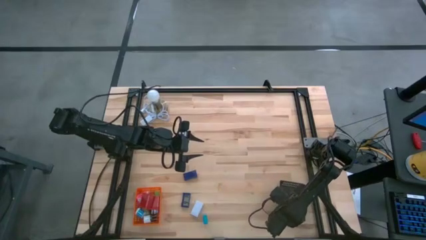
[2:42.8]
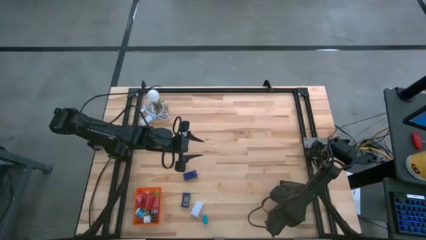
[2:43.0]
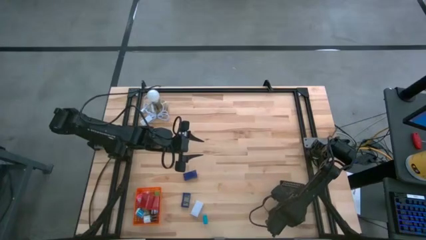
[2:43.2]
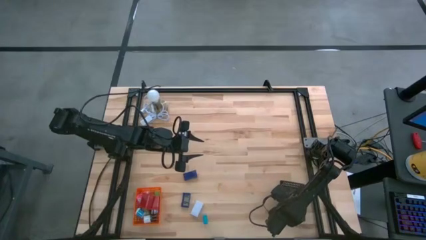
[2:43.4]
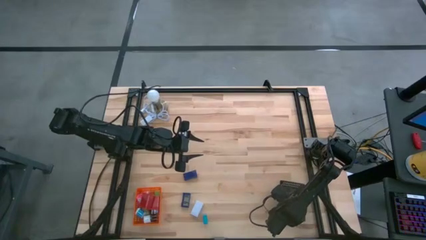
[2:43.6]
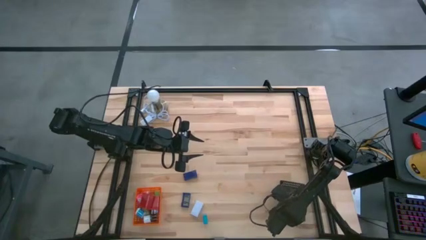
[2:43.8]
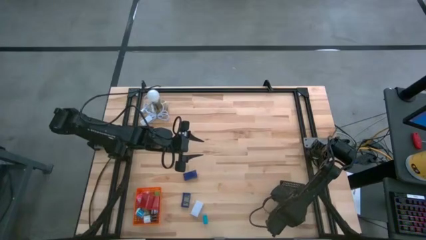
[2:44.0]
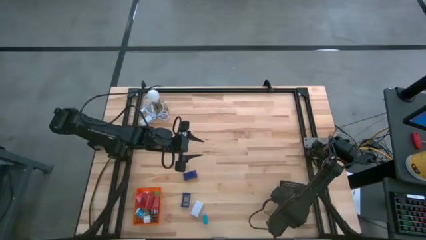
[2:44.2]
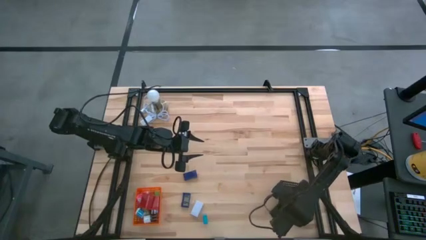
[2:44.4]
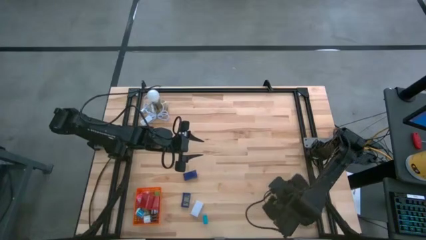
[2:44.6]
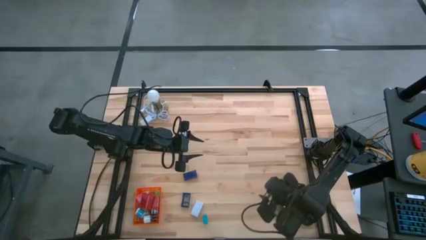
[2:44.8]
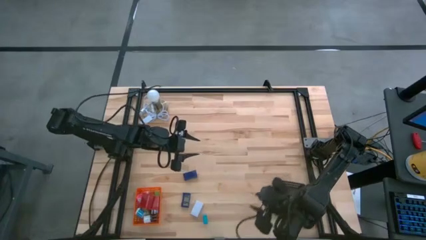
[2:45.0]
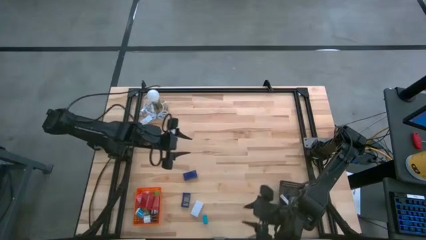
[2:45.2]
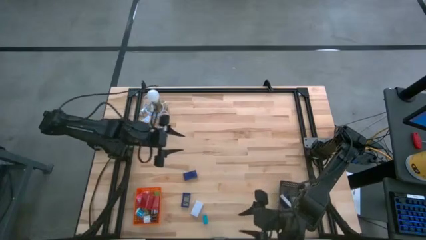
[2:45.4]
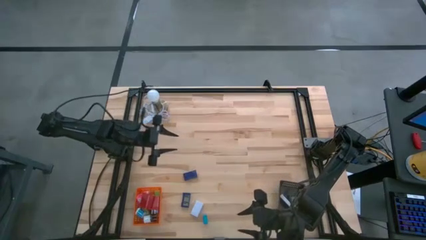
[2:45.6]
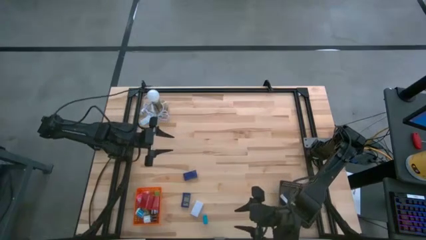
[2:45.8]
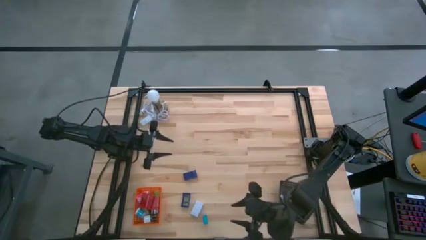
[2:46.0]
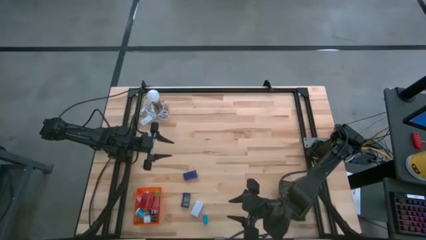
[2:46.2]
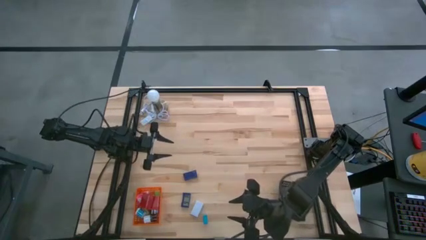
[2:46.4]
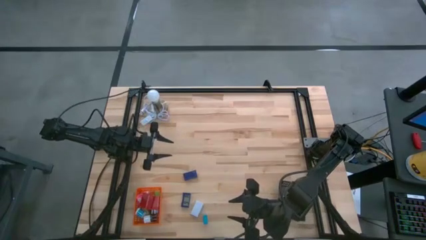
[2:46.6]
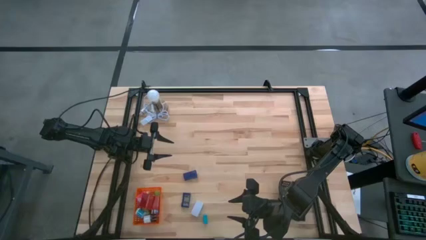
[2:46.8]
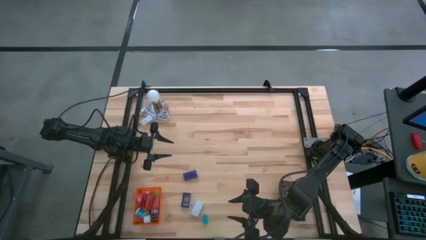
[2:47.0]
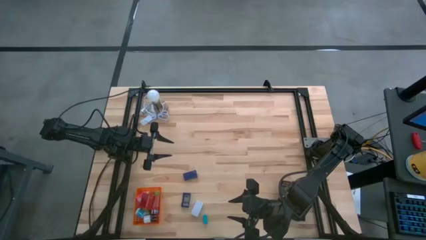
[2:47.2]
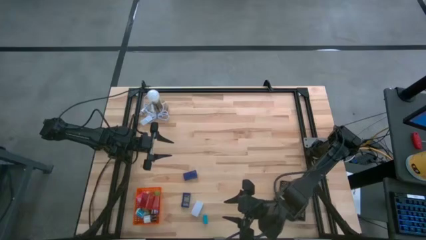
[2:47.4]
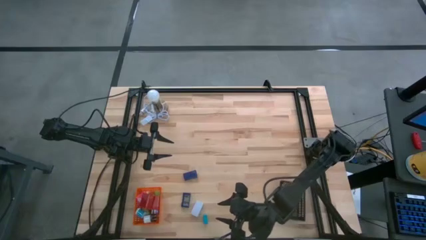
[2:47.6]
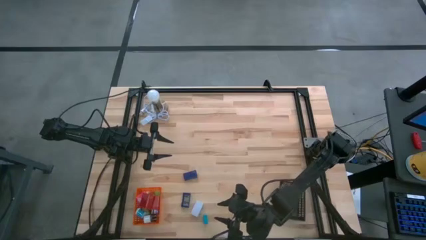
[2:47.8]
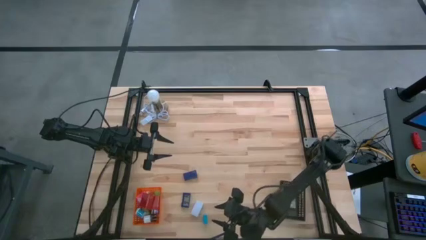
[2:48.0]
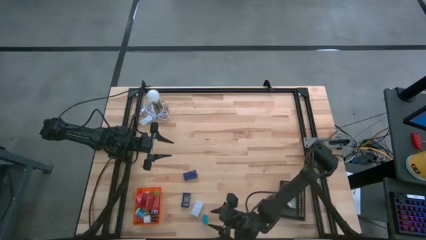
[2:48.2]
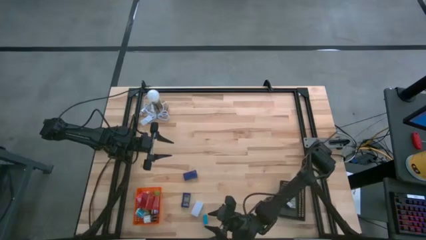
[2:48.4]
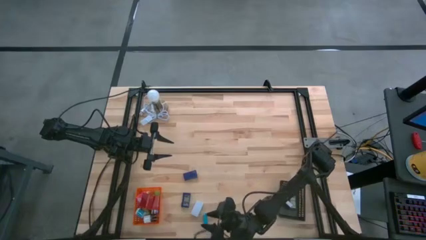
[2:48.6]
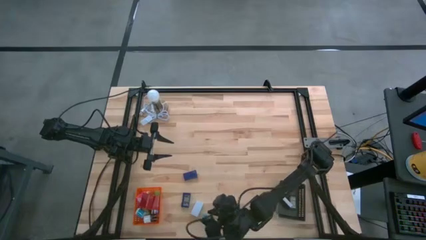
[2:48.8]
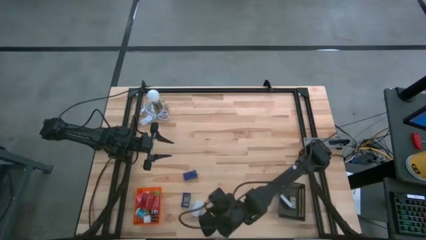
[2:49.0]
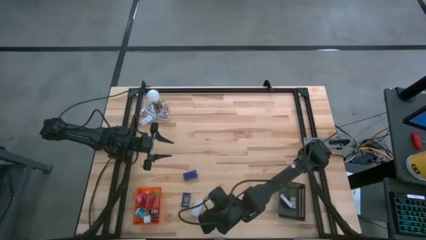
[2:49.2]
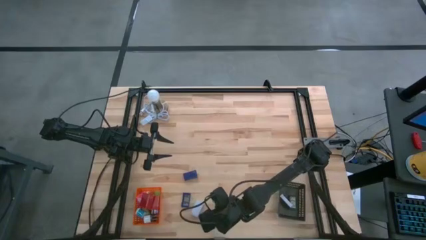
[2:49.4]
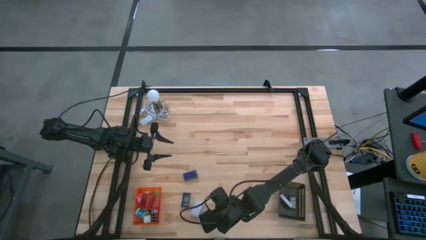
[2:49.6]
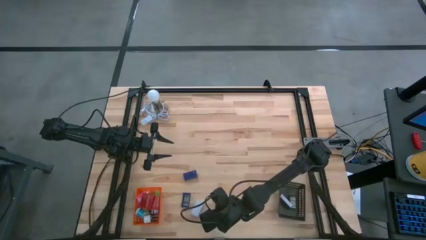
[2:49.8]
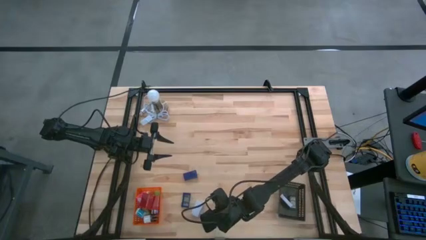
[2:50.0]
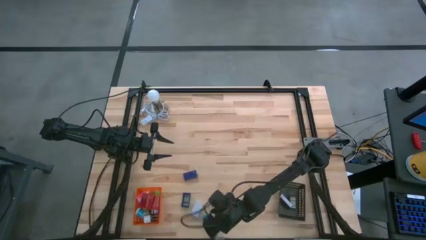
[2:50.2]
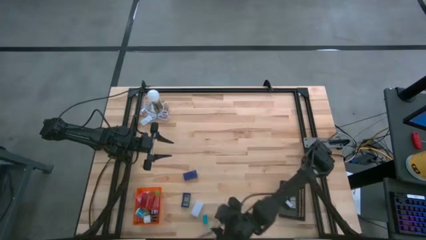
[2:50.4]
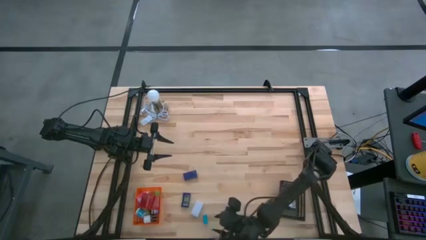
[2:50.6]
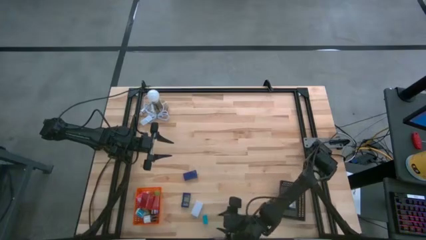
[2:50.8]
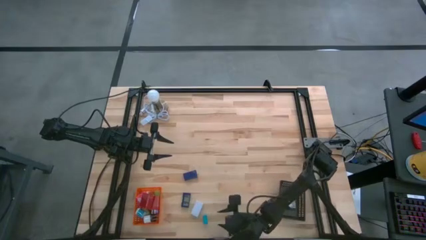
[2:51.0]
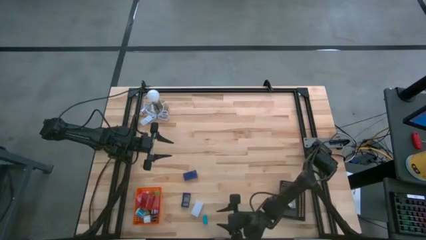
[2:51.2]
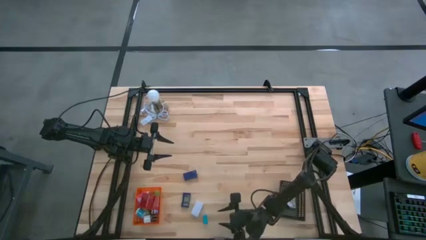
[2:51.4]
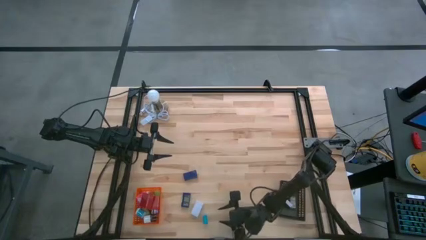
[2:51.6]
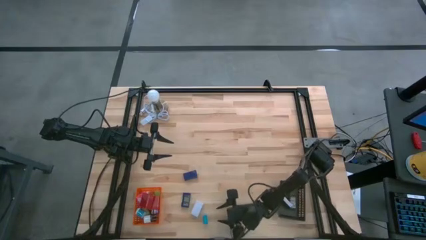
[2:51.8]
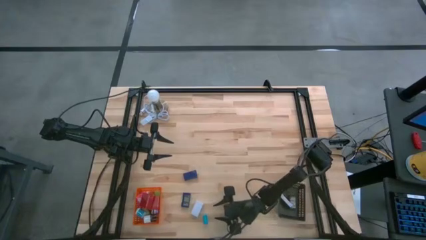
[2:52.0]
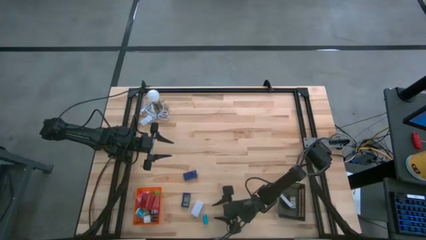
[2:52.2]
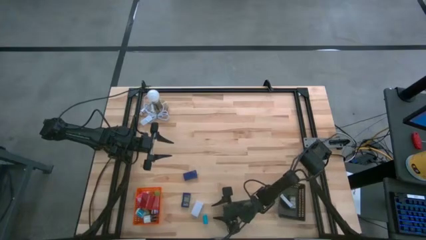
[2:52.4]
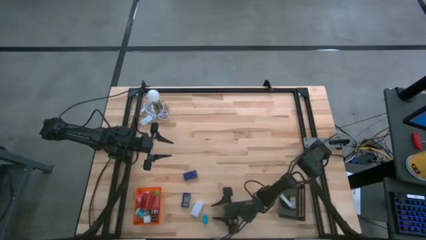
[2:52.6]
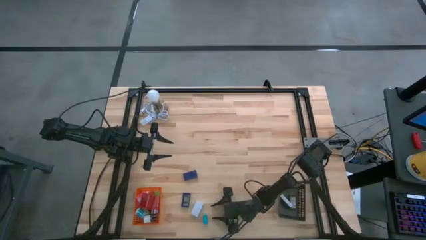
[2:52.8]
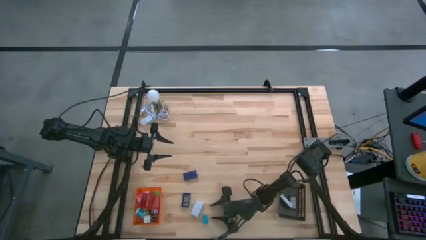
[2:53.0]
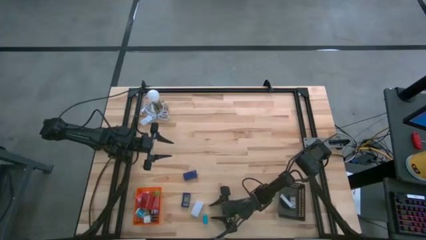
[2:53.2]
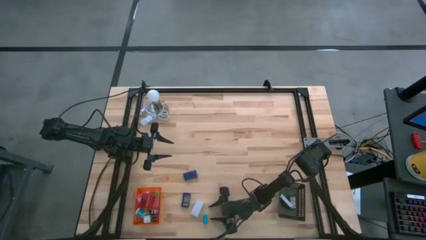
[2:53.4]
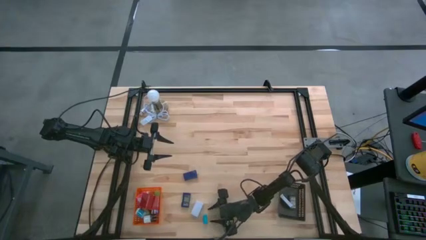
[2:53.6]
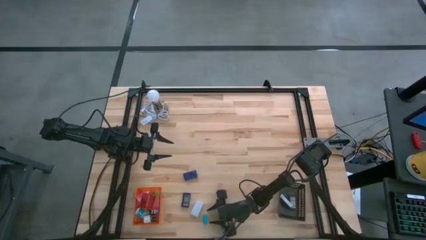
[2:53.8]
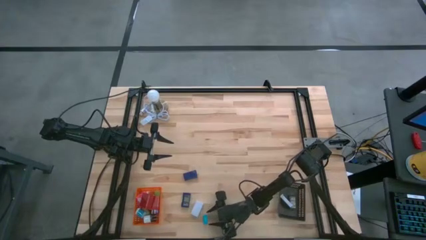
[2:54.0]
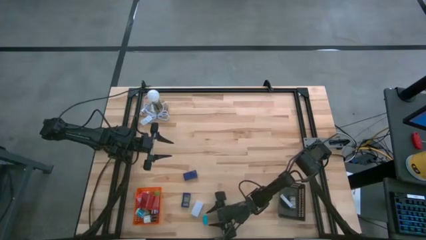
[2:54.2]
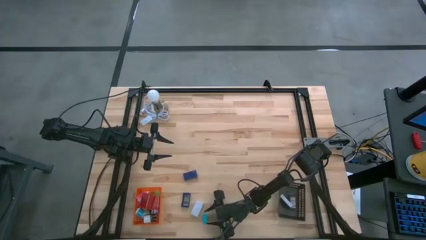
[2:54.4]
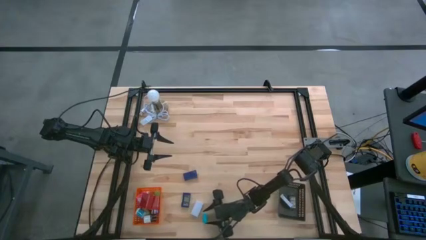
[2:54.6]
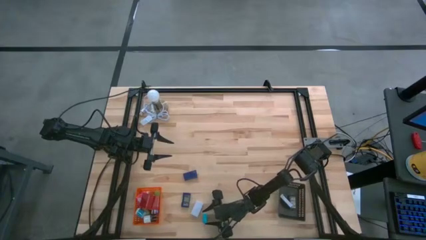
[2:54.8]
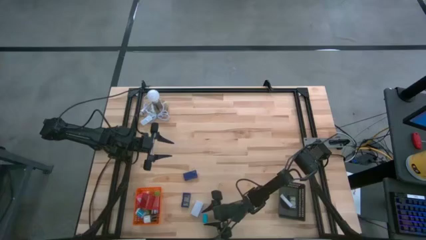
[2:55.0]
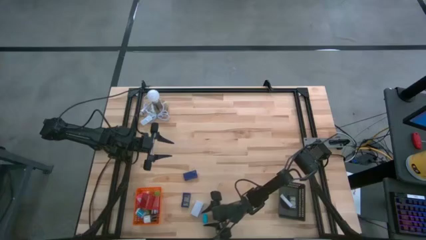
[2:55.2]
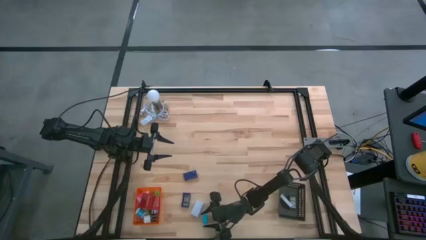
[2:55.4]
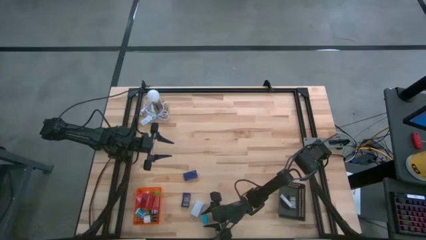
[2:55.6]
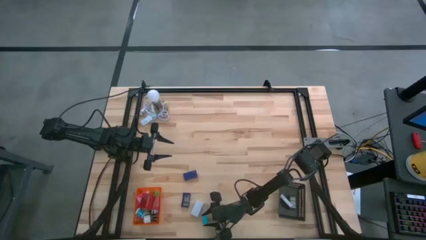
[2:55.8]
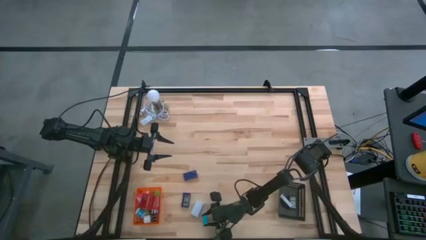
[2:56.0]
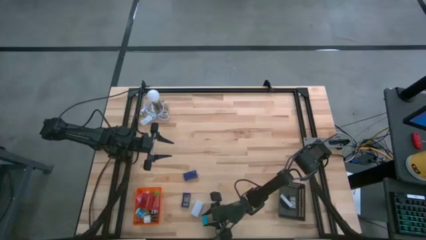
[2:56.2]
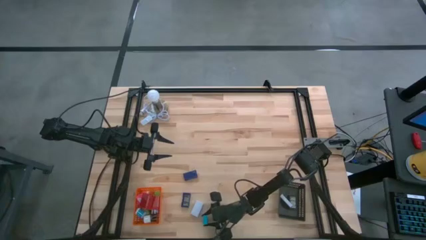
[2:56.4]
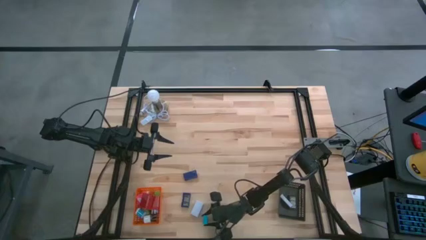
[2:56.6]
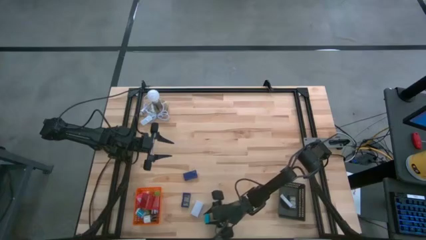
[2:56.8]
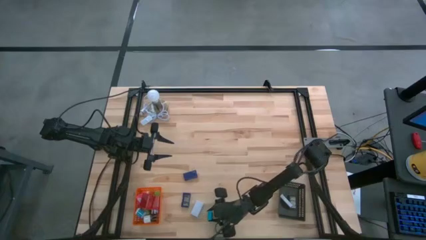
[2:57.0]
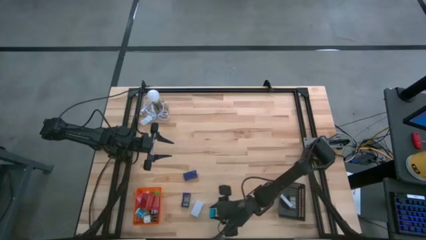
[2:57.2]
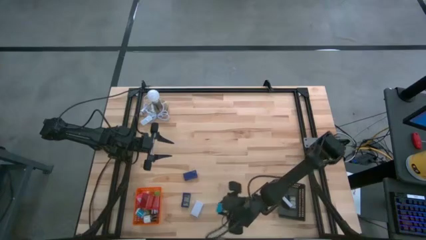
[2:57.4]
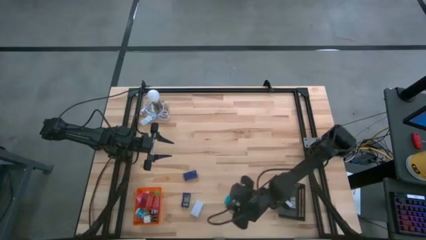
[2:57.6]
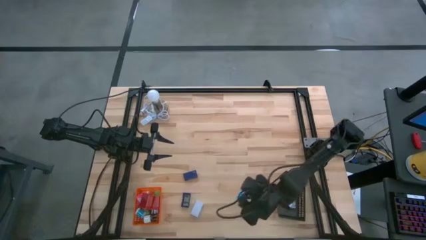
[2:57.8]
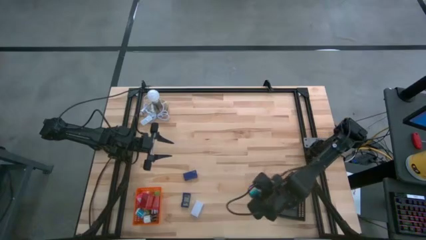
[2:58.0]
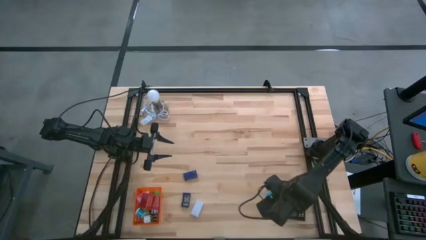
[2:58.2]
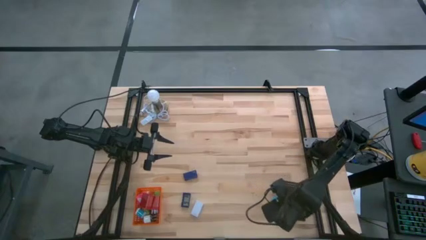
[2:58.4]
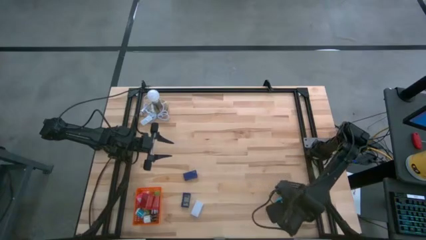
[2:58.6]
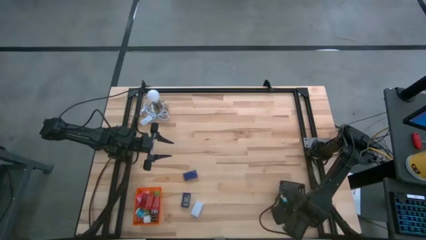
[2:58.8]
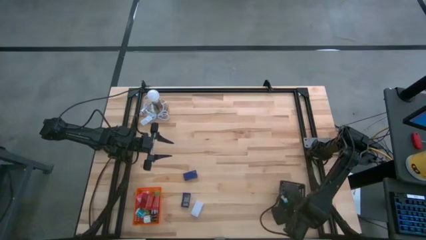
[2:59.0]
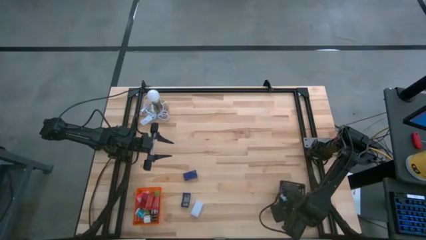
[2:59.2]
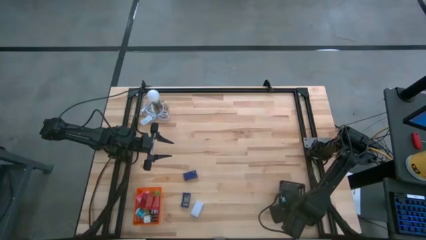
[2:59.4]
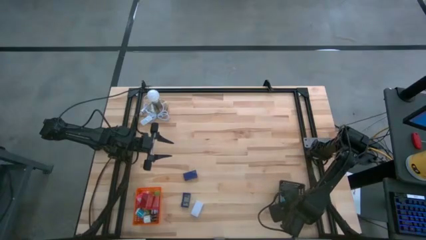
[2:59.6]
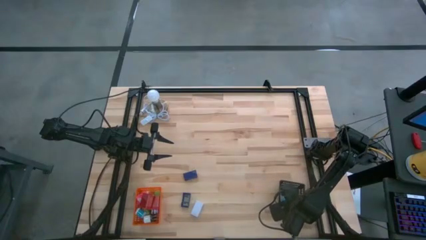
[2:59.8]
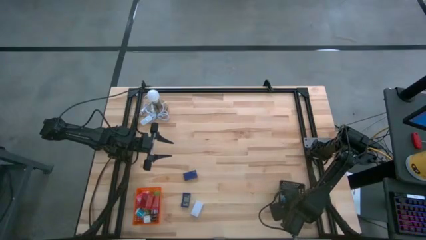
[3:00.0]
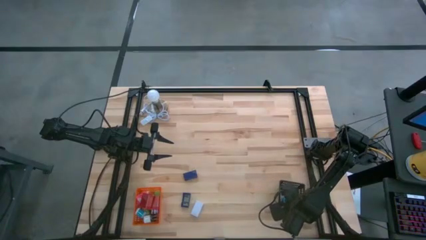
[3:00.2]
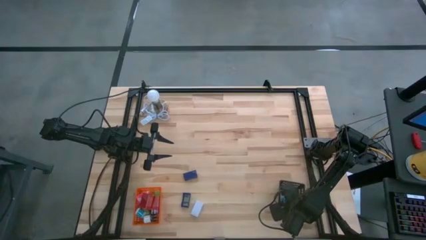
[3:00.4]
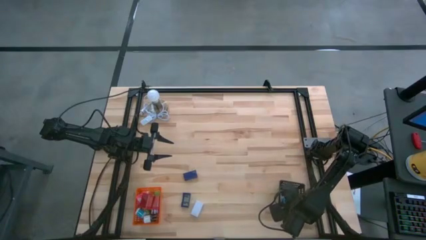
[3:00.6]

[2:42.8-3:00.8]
Task: Pick & Place Office items
Put the light blue digital clock into the black bin
